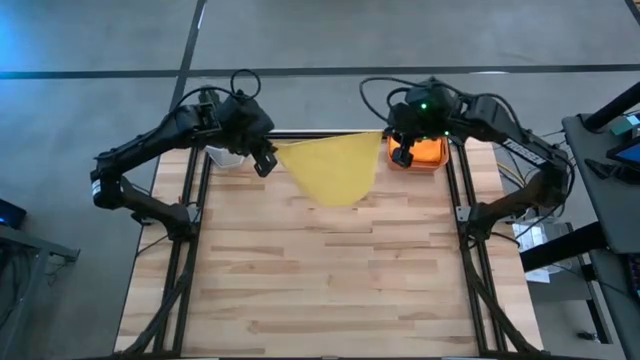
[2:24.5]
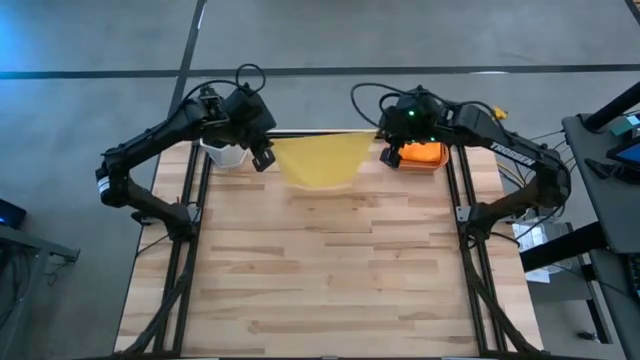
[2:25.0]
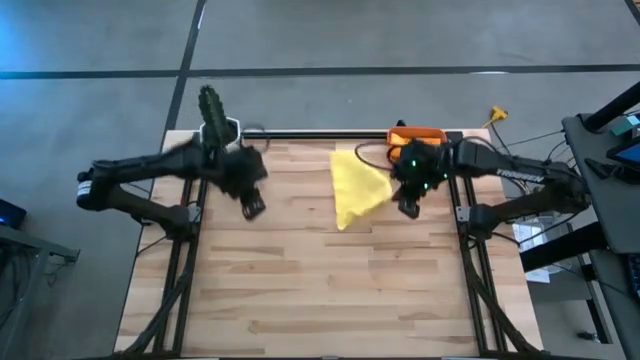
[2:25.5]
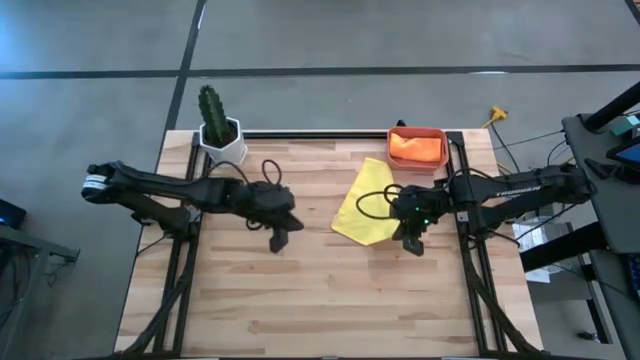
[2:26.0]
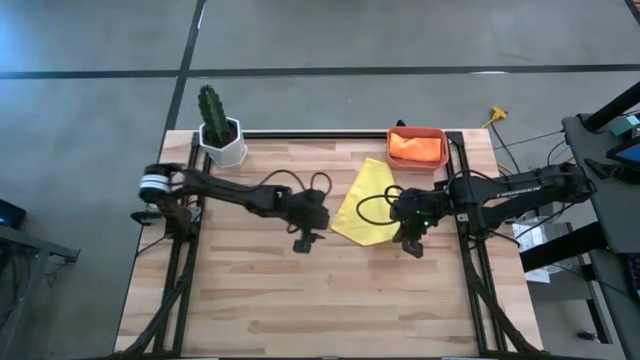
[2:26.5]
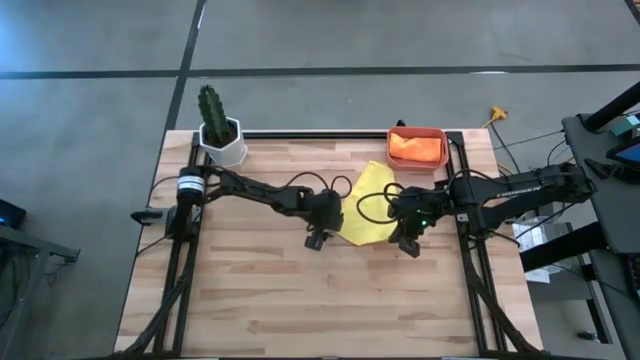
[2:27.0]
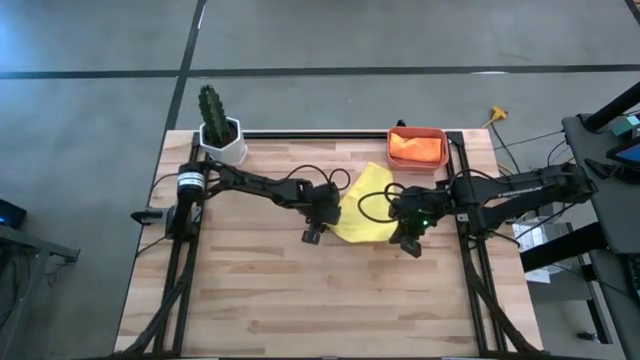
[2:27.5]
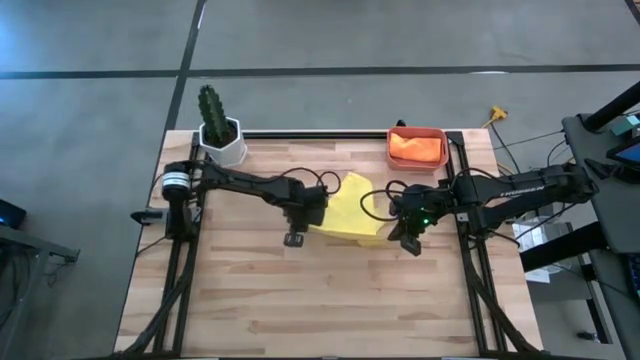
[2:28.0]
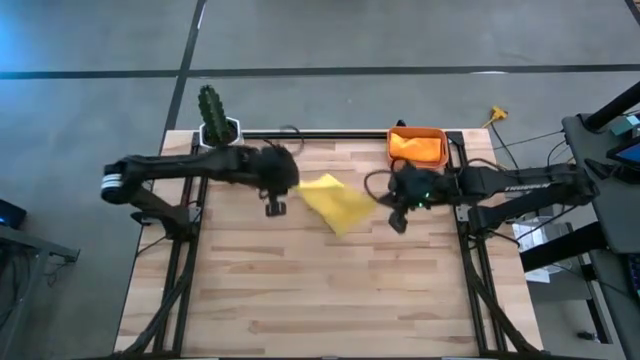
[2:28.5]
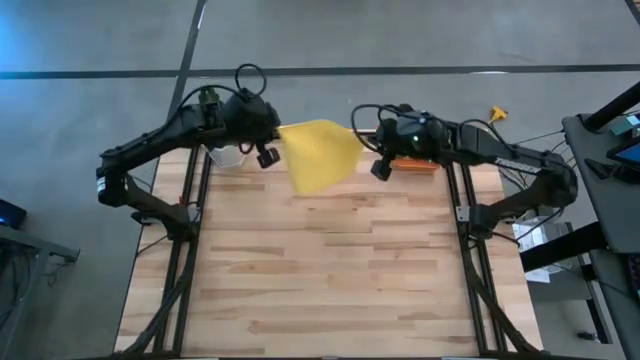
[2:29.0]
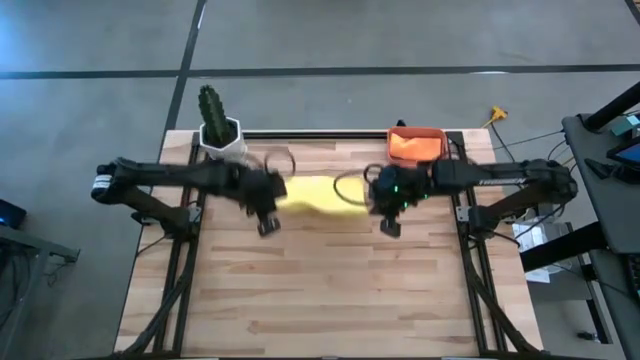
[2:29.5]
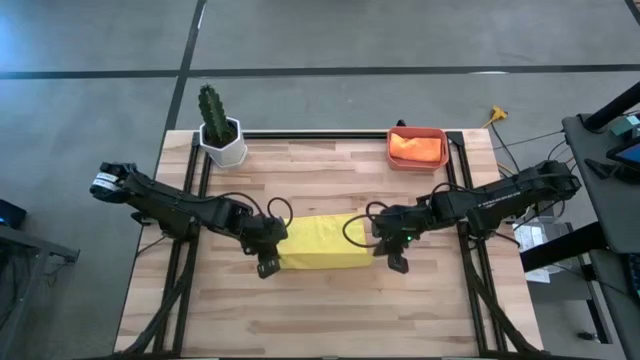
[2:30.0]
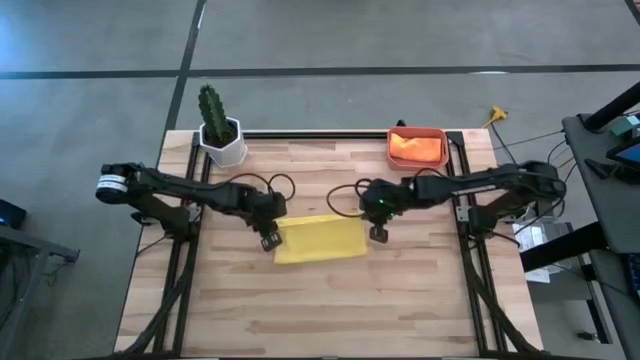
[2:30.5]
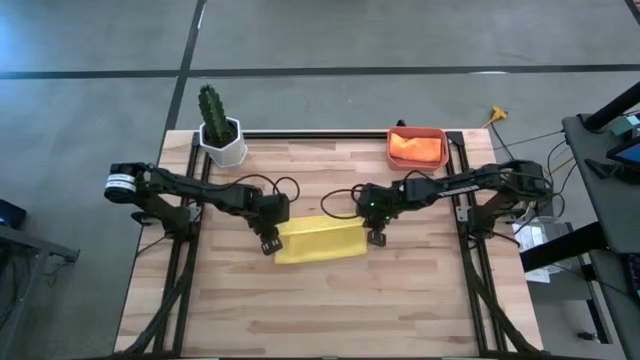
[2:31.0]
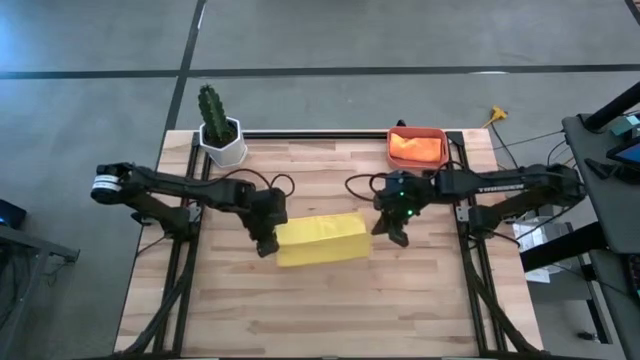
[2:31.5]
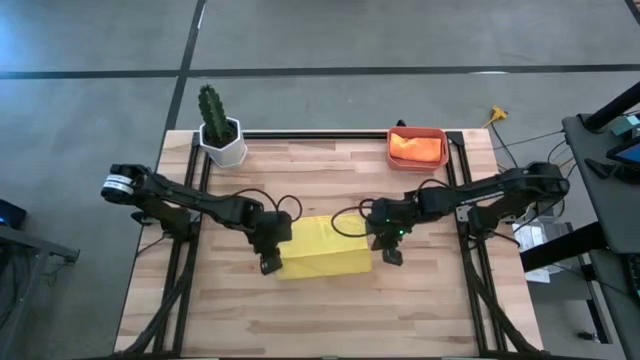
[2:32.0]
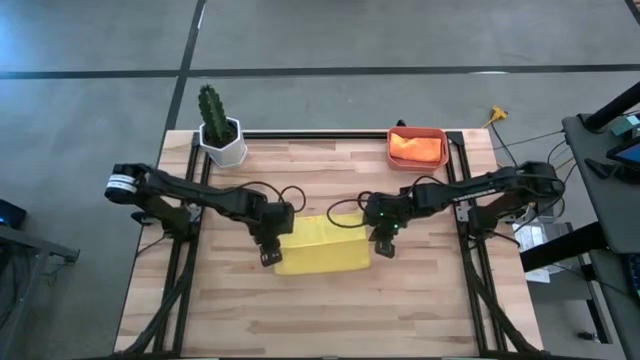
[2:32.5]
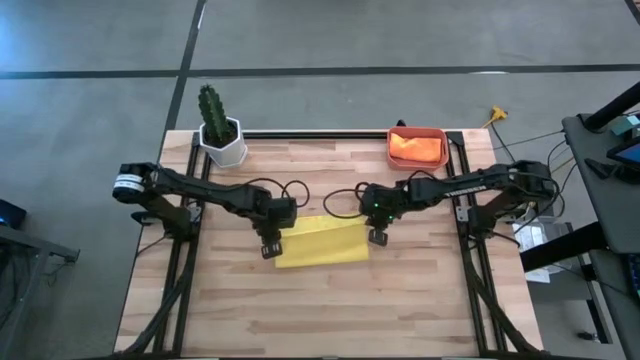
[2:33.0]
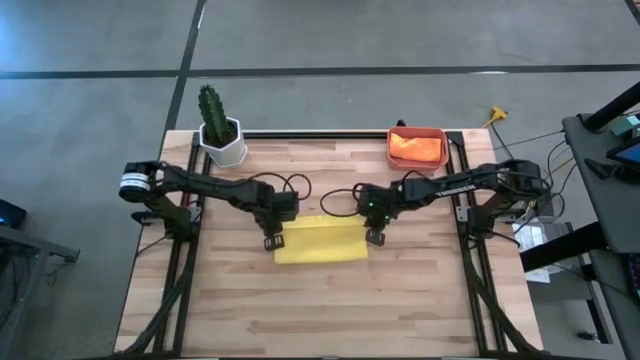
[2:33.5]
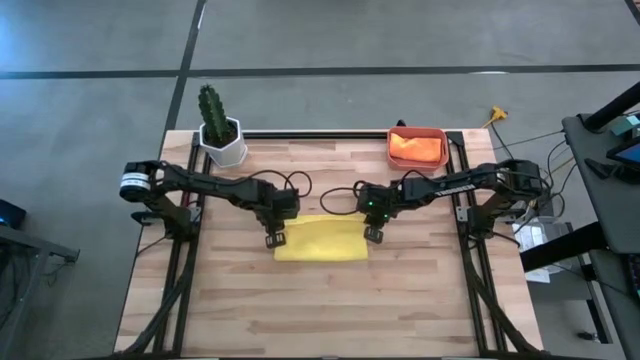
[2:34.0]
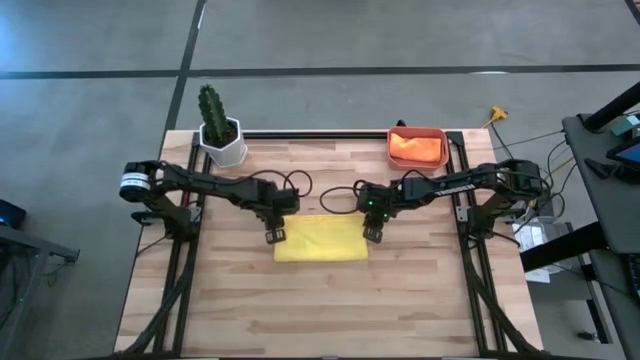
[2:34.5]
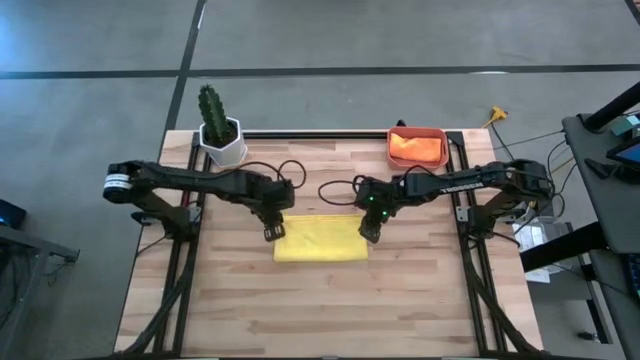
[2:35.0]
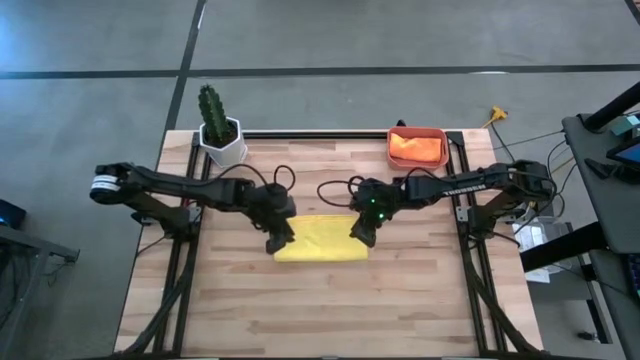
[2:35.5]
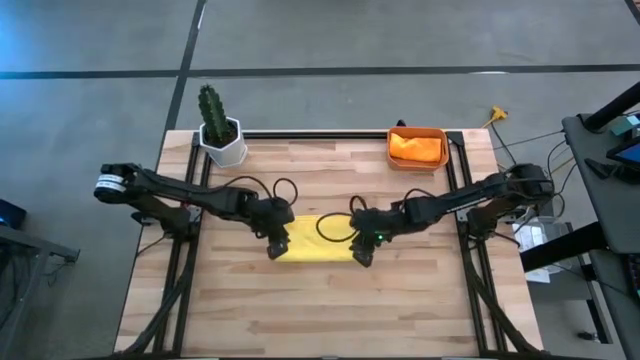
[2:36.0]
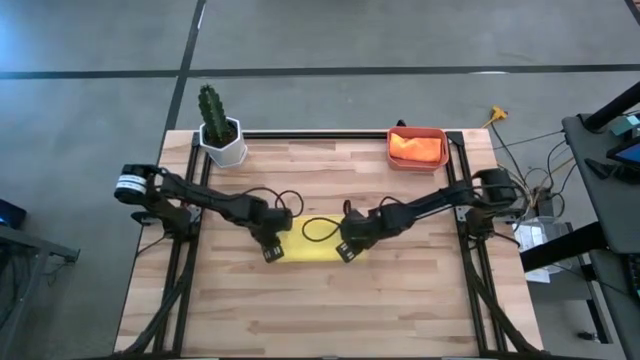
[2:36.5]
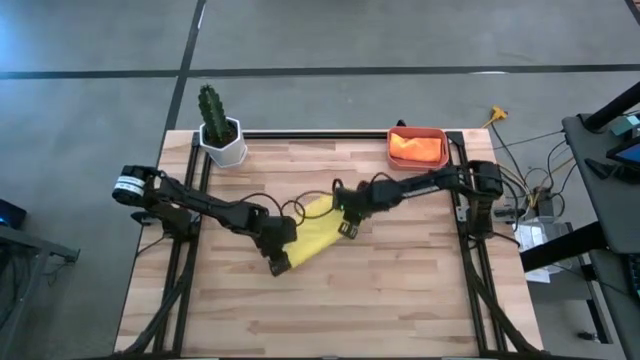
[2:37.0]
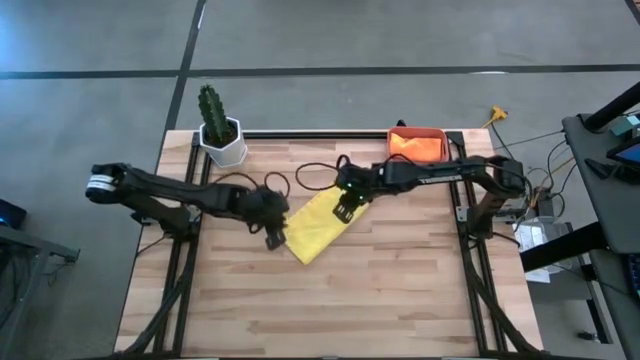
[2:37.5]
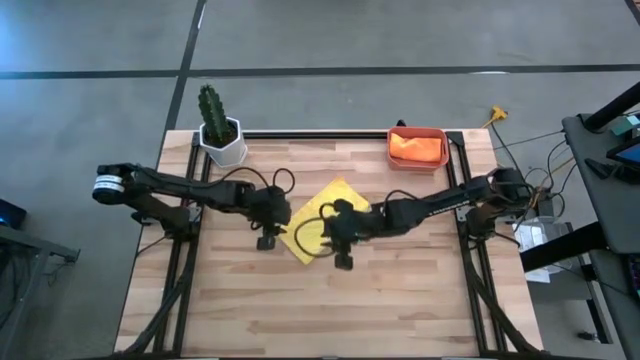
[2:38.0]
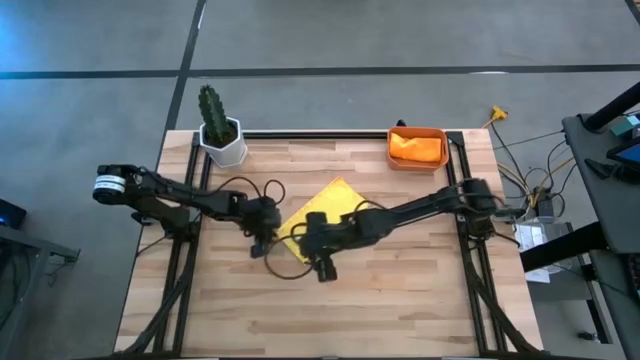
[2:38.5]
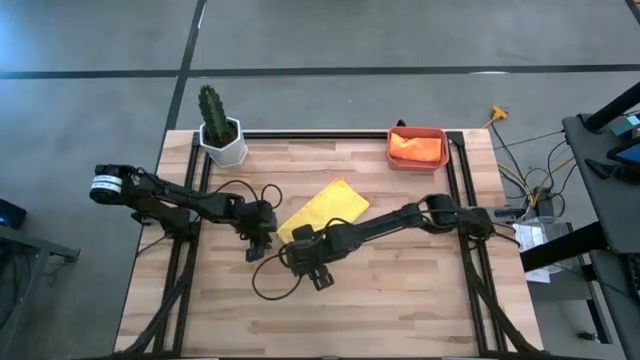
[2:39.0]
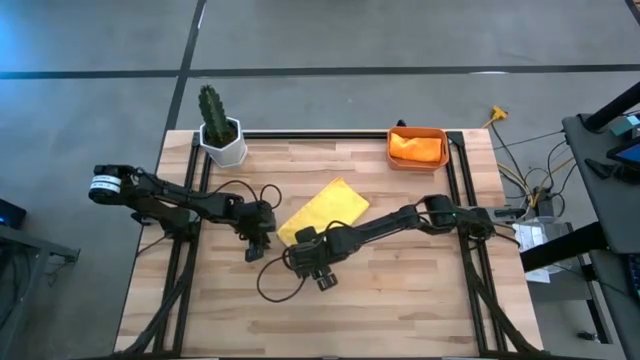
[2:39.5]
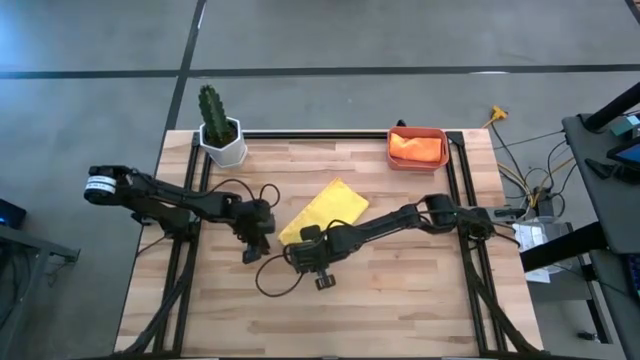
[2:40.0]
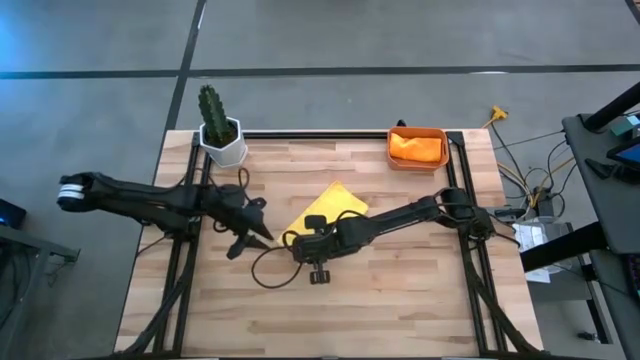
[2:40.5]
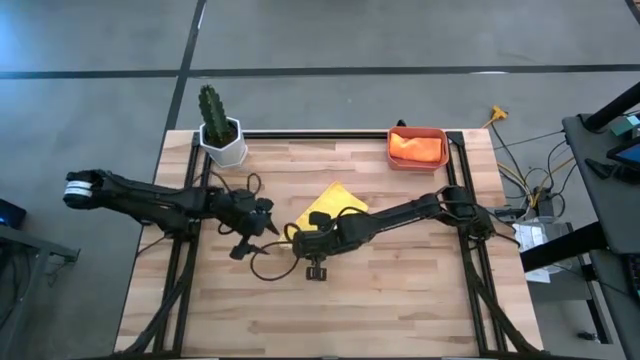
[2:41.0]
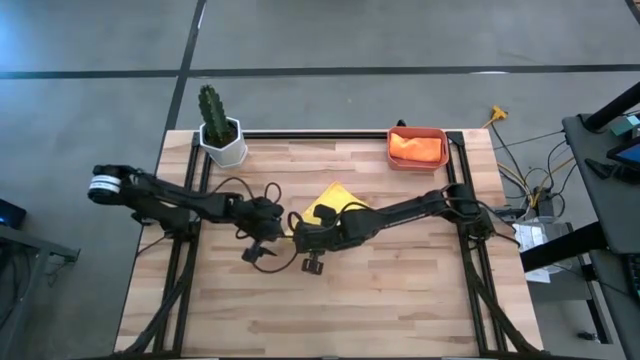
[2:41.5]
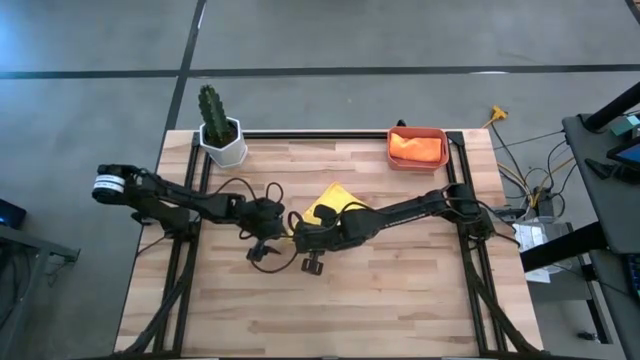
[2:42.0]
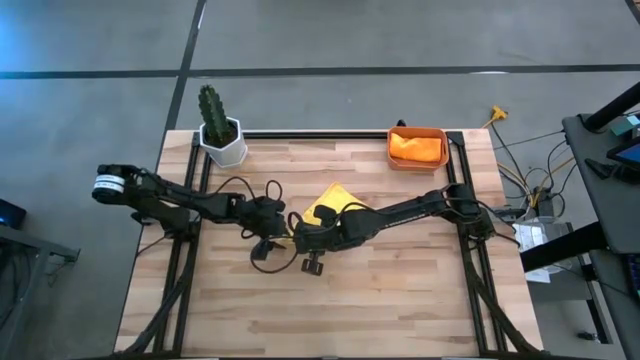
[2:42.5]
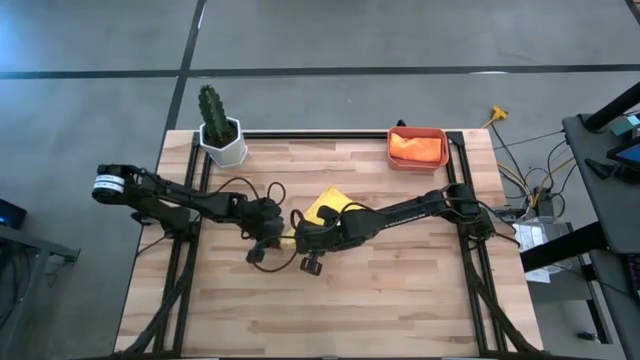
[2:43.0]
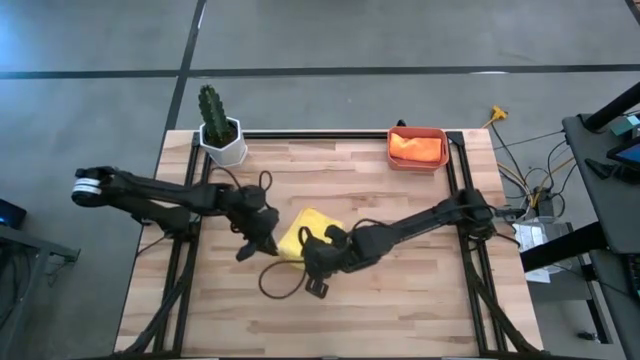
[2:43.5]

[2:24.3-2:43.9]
Task: Roll microfiber towels into tight, uniform cylinder then place into a basket
Fold the yellow towel
